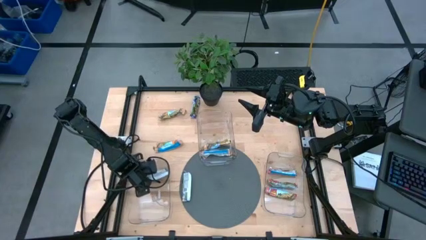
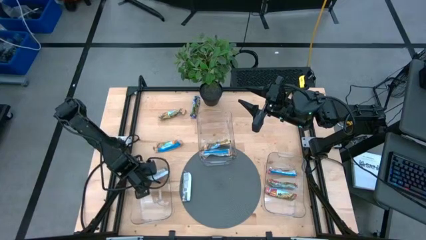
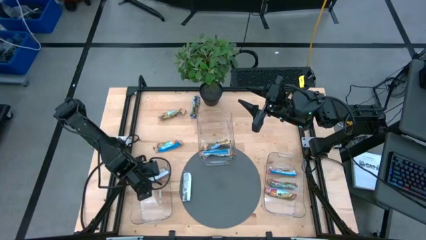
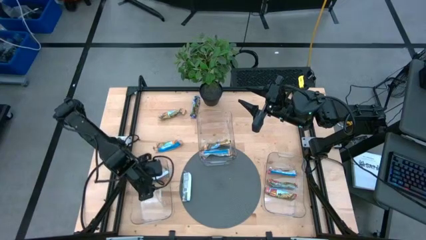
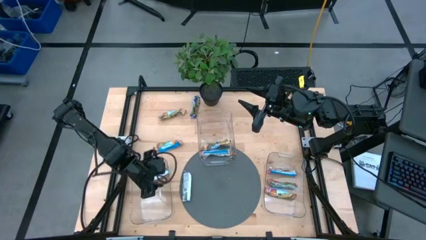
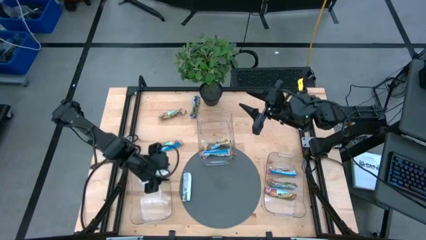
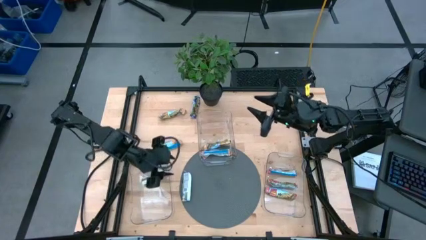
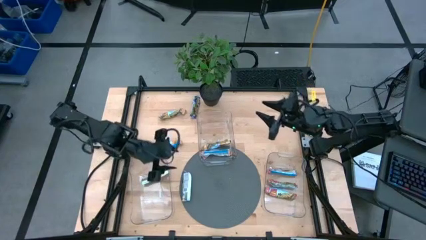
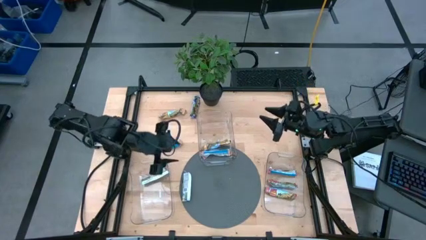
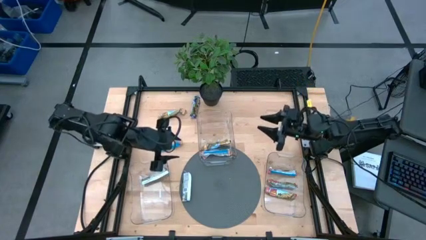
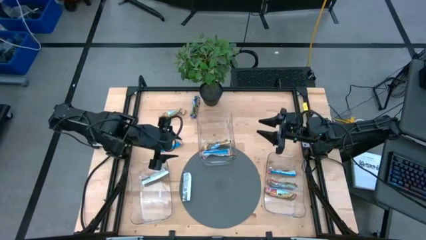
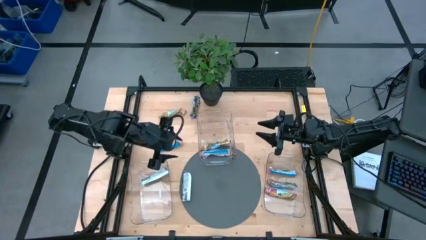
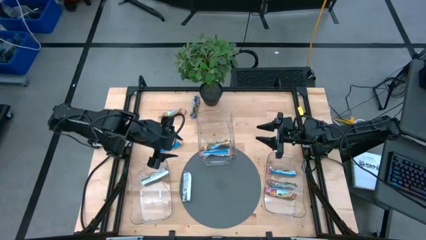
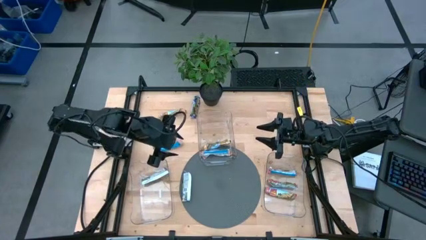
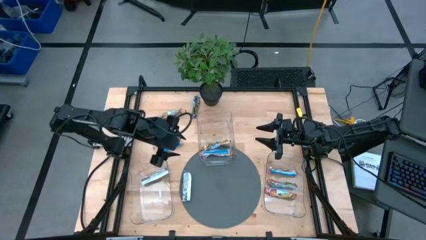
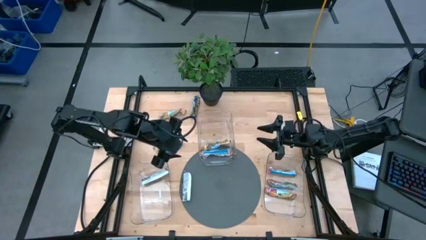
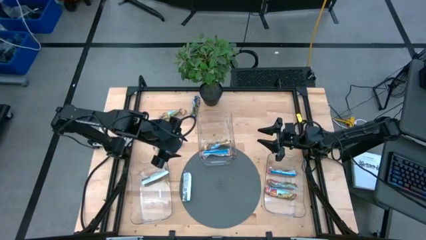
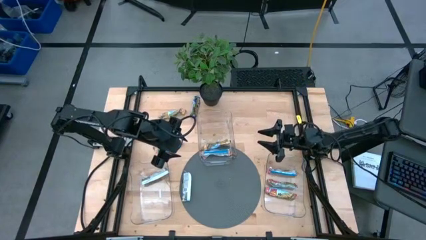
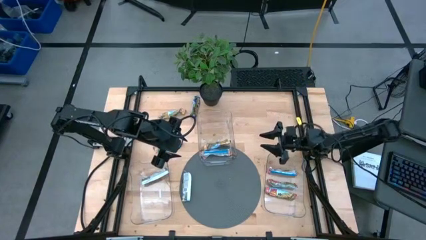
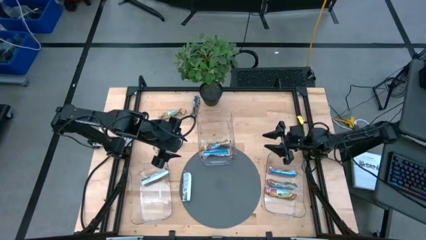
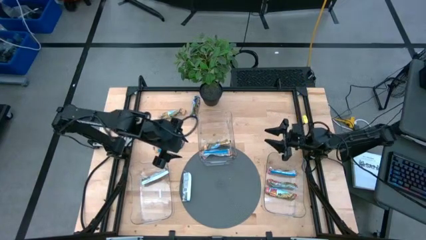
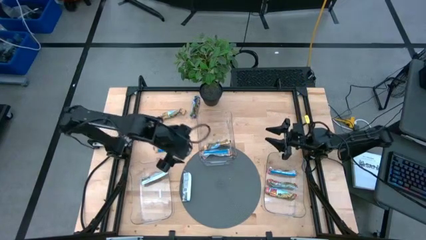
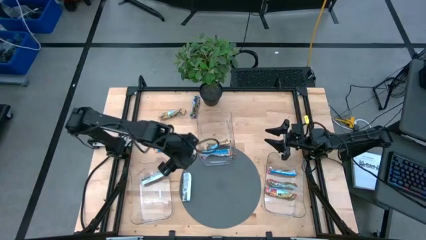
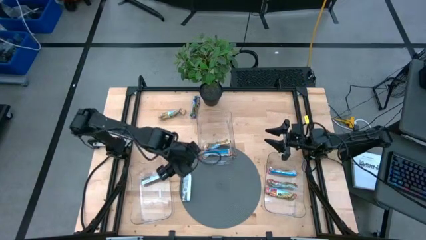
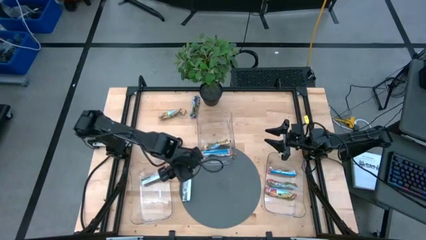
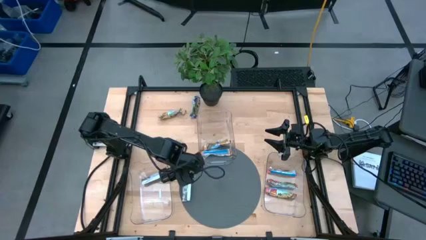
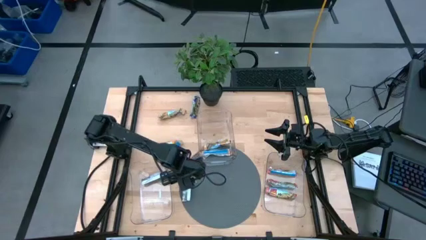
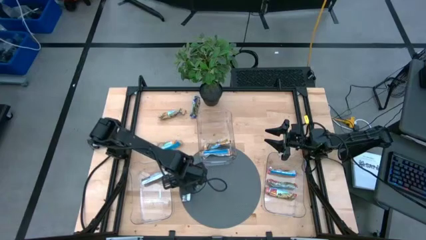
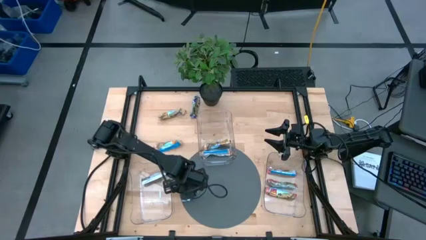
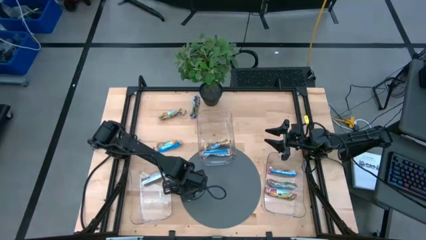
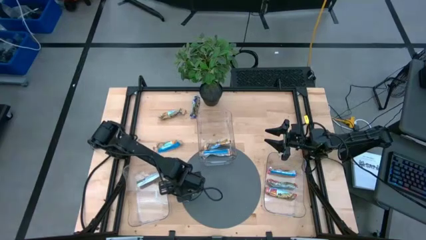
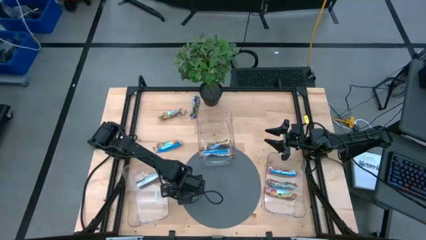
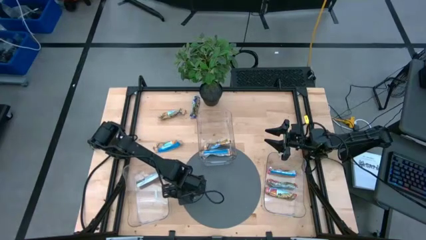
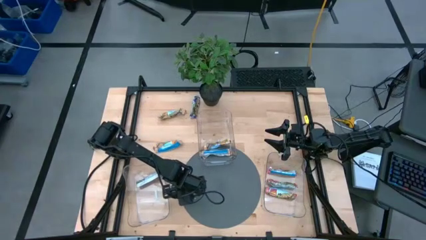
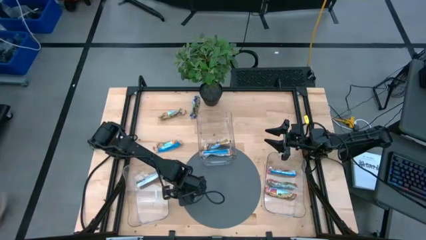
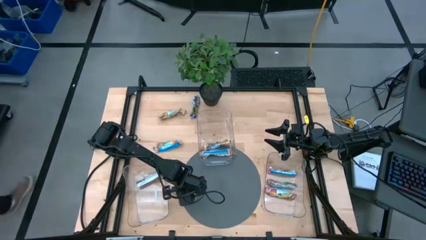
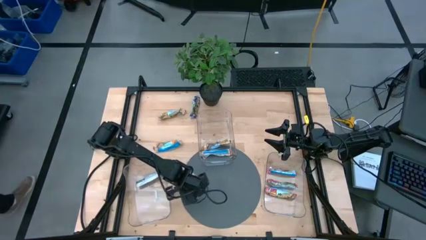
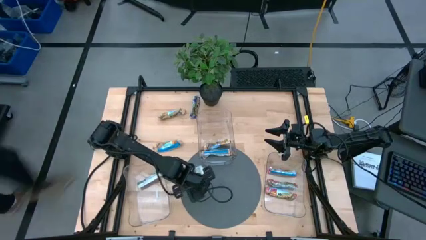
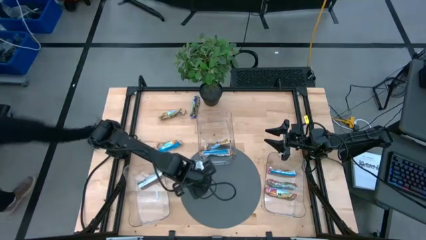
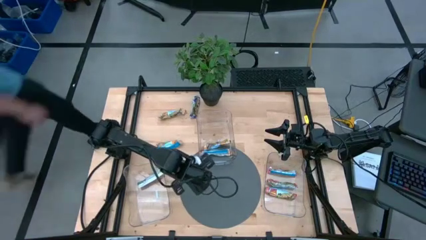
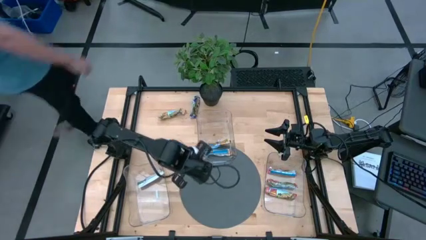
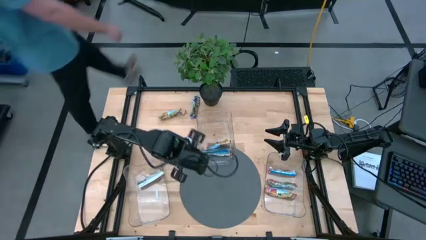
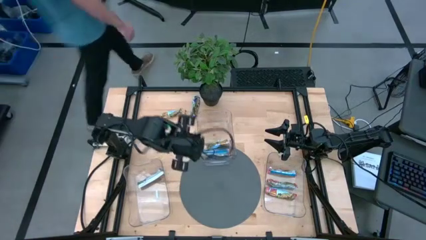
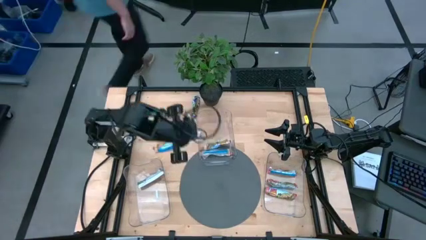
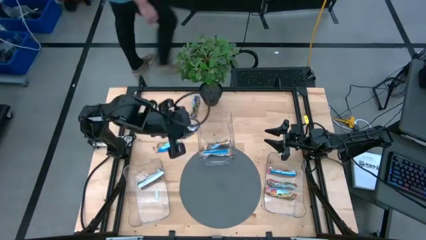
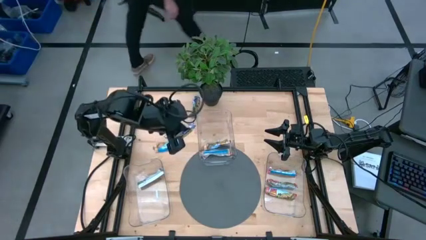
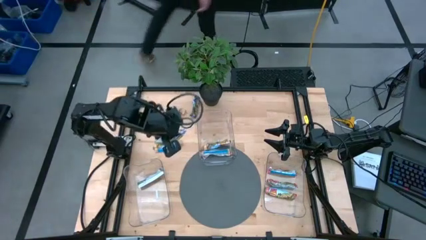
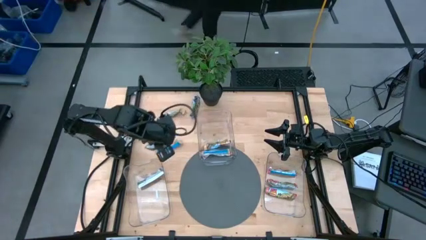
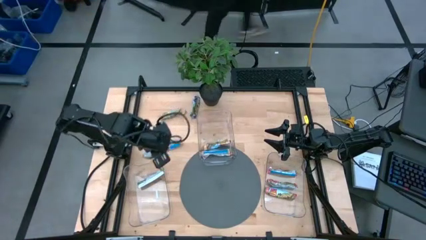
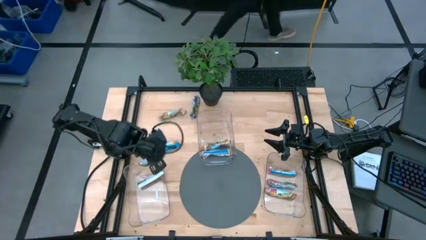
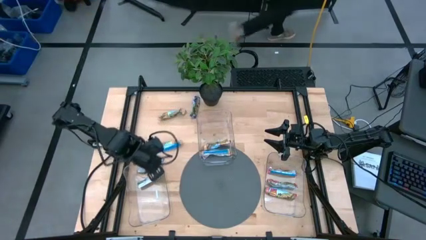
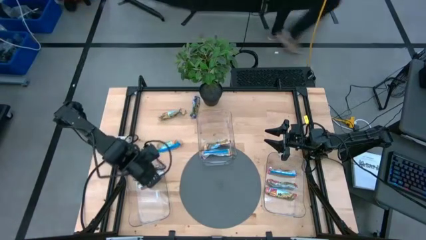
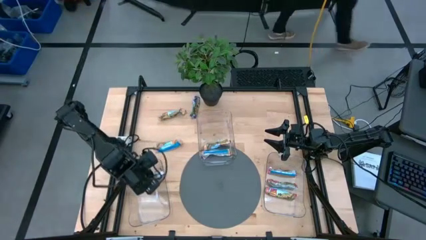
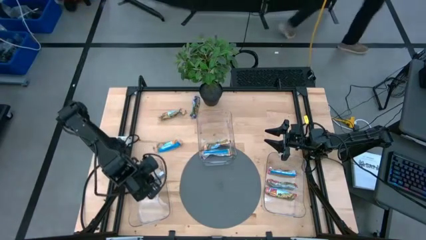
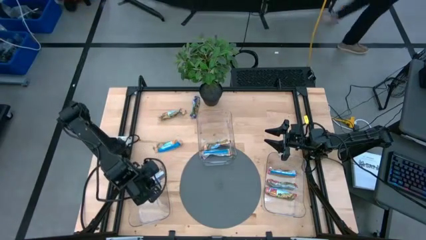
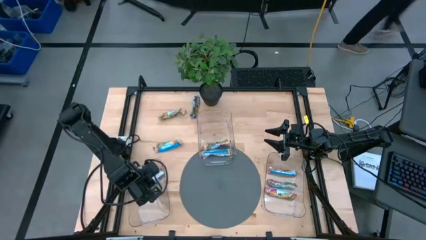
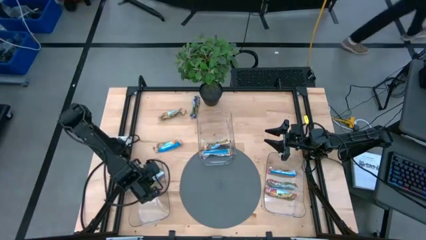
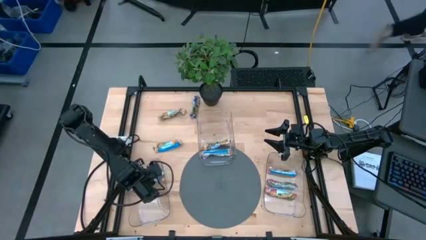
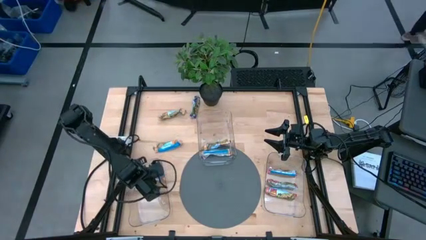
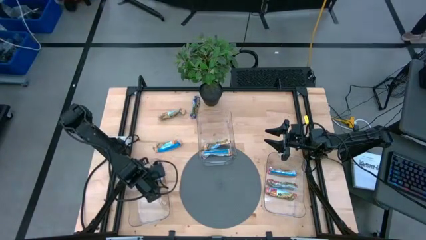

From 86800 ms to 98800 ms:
Task: Pick and place Granola Bars by type
Put the bottom green granola bar into the left transparent bin

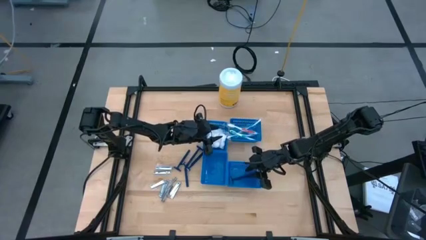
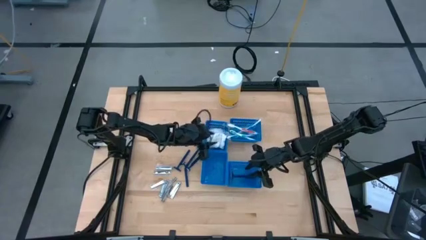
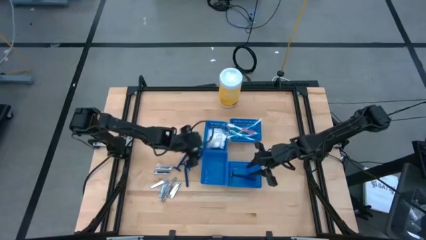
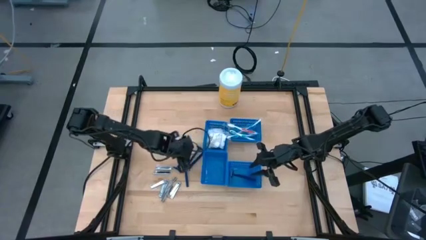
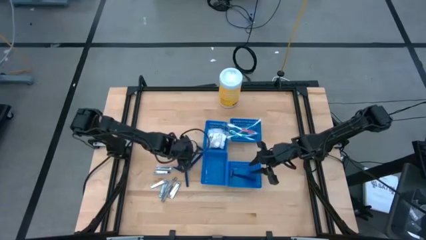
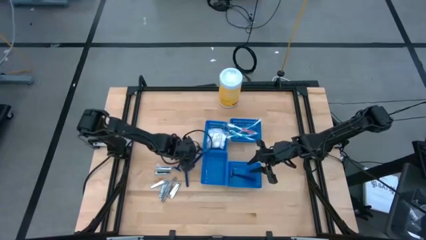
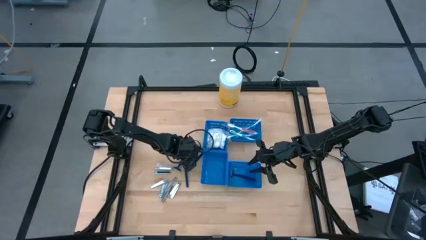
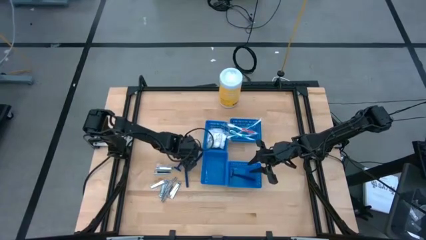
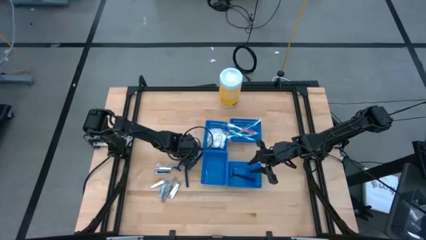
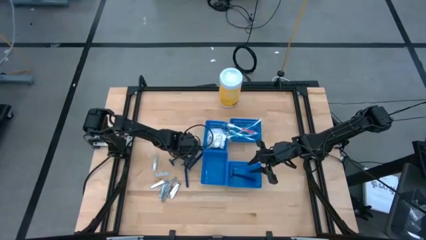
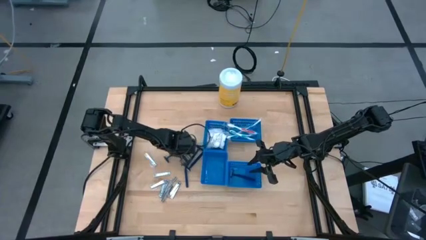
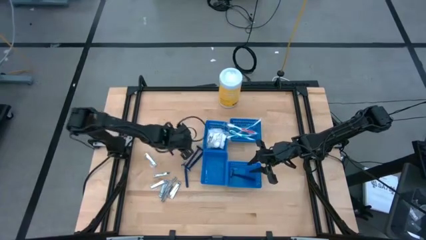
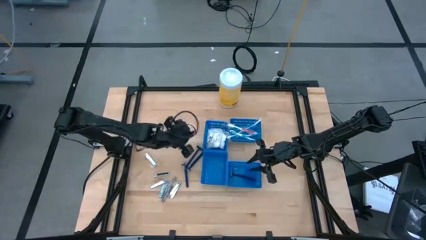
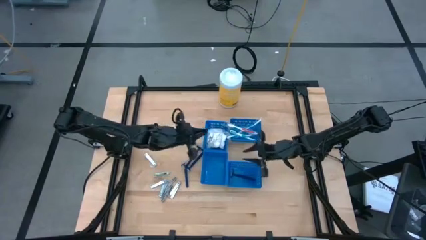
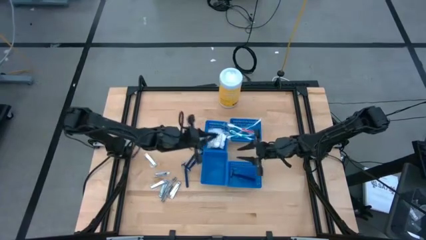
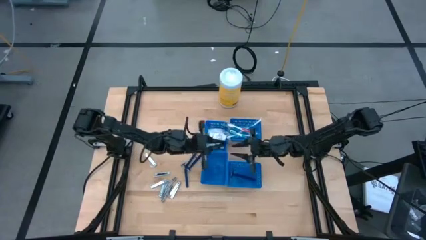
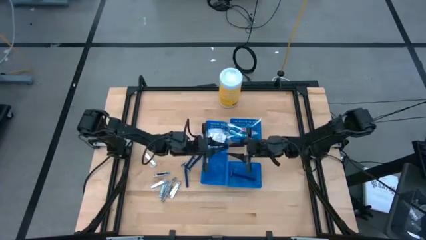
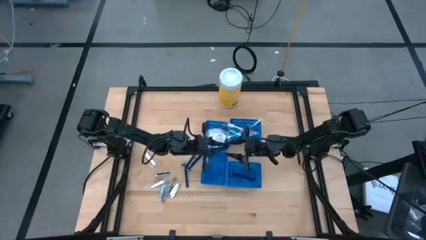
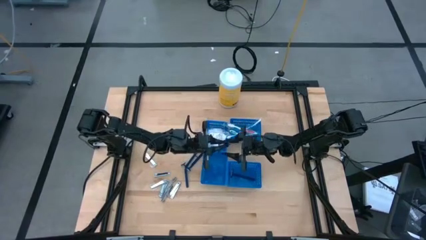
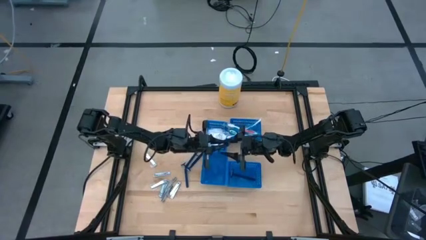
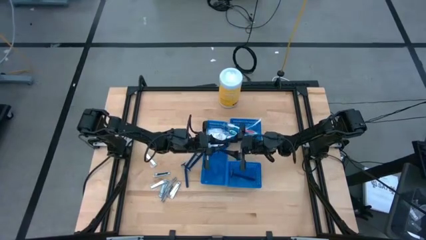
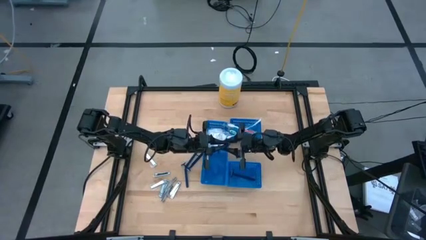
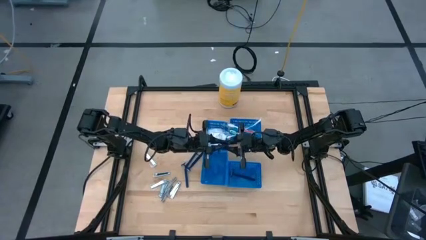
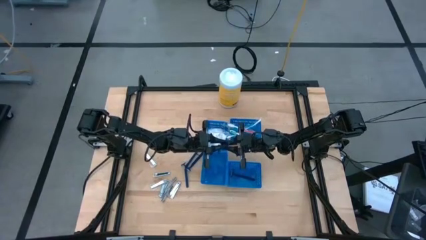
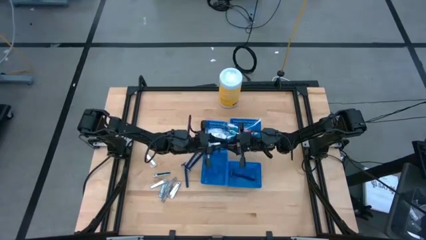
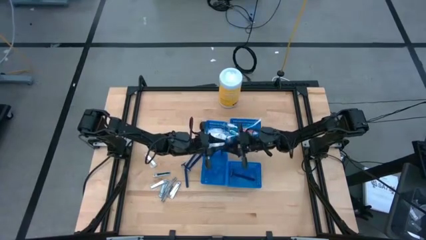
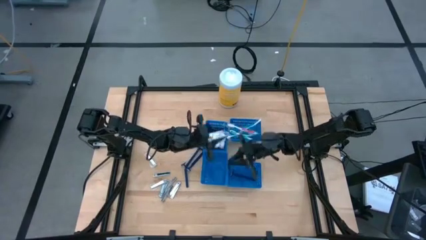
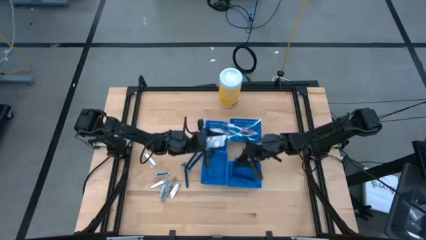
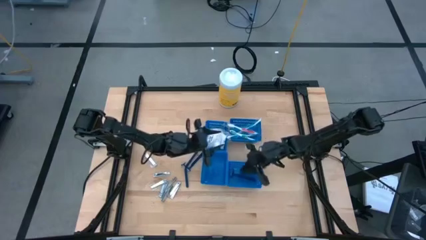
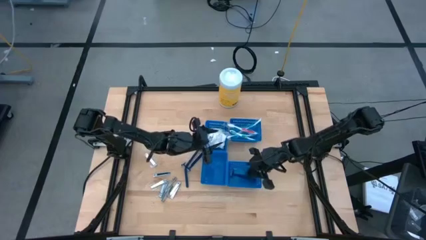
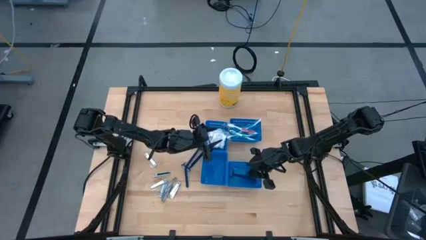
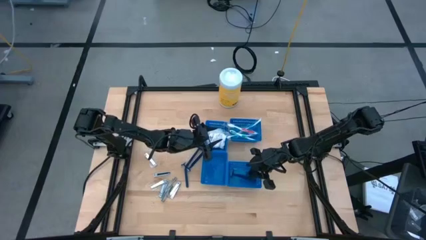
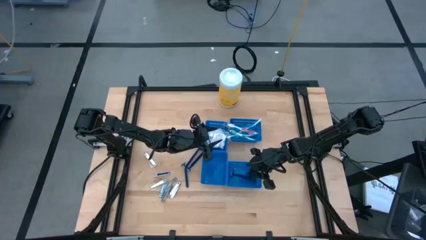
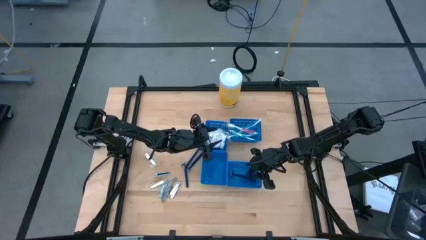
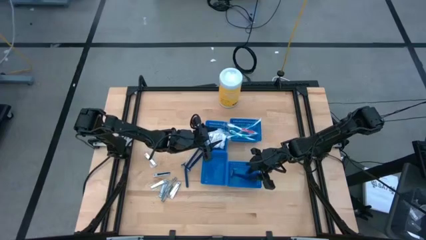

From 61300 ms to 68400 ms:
Task: Pick & Place Travel size toiletries
Put the blue razor into the bottom right blue bin
